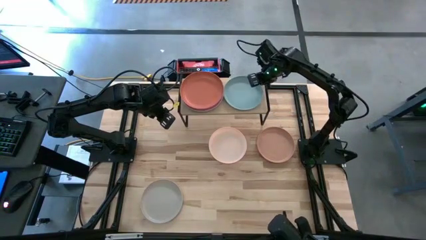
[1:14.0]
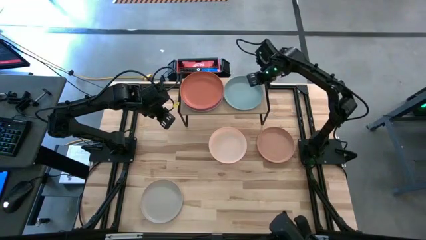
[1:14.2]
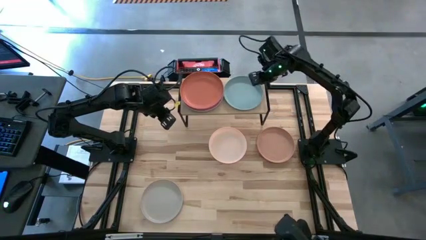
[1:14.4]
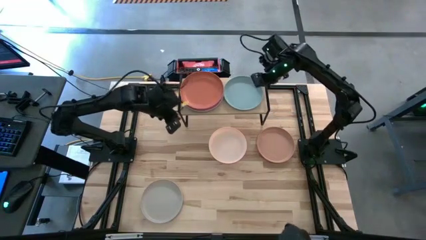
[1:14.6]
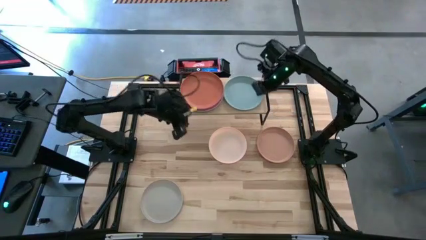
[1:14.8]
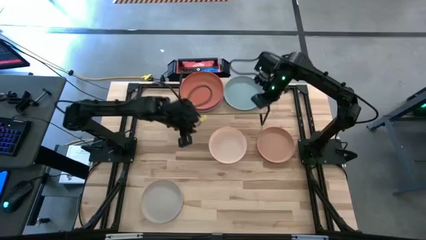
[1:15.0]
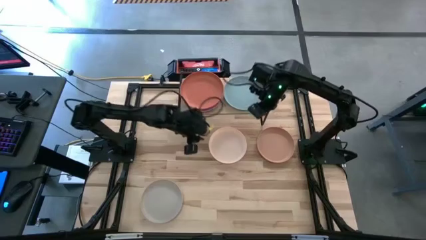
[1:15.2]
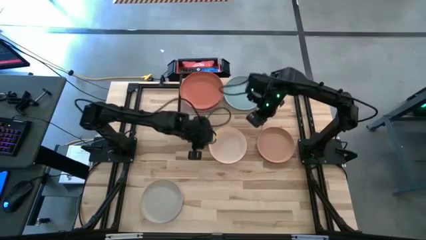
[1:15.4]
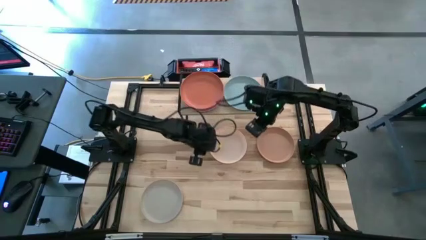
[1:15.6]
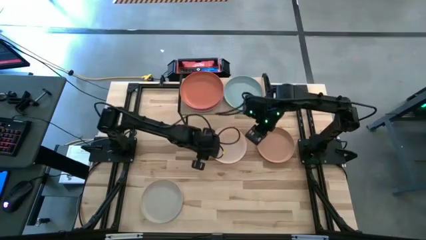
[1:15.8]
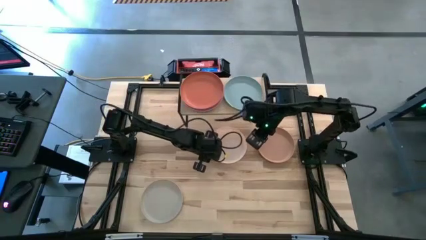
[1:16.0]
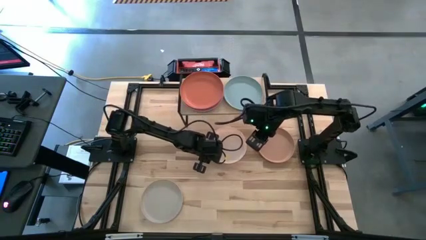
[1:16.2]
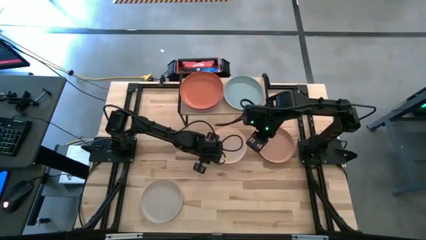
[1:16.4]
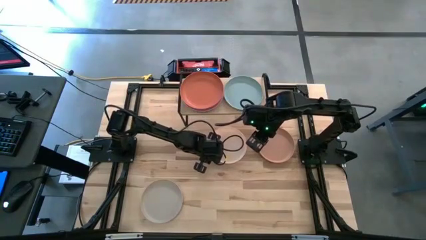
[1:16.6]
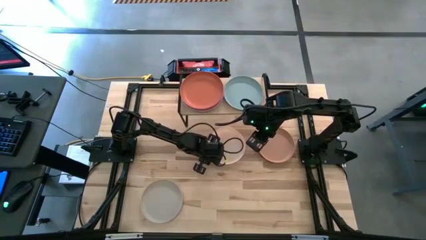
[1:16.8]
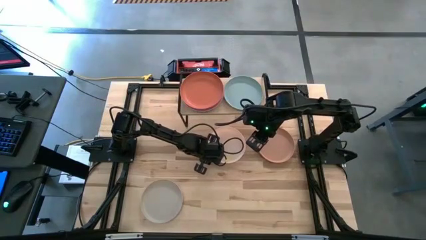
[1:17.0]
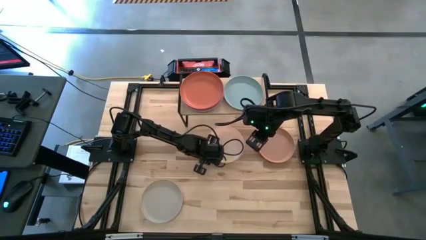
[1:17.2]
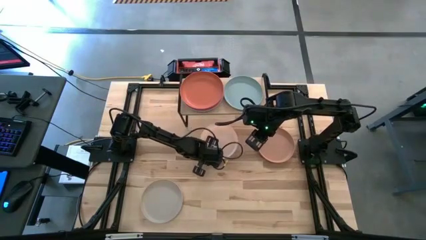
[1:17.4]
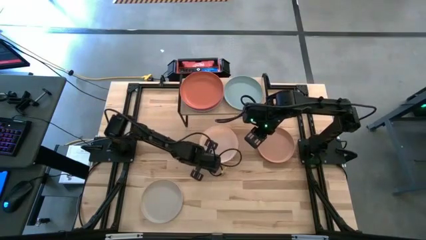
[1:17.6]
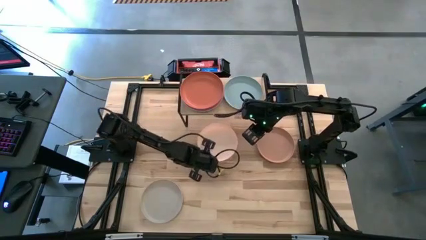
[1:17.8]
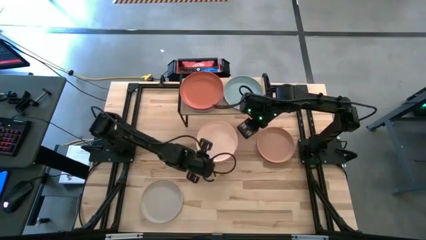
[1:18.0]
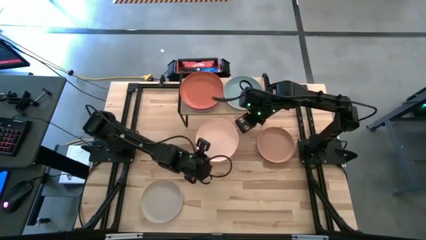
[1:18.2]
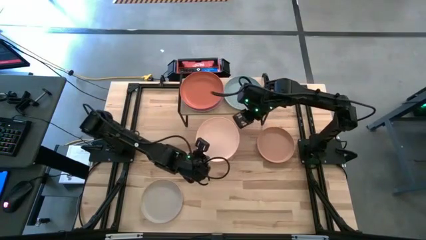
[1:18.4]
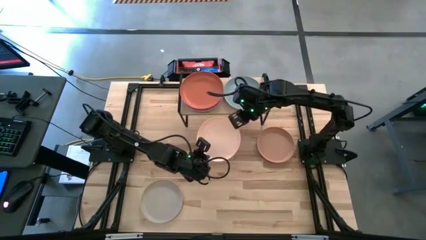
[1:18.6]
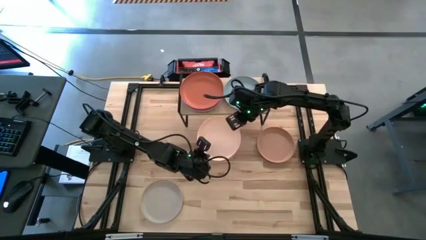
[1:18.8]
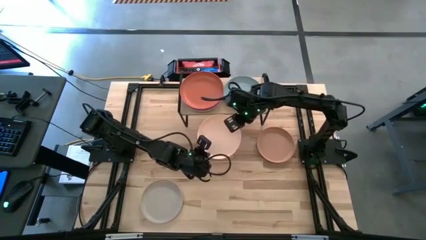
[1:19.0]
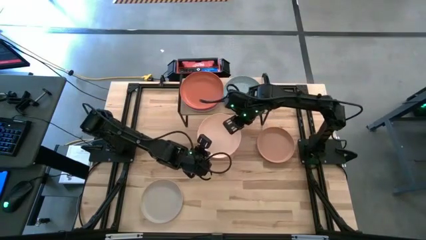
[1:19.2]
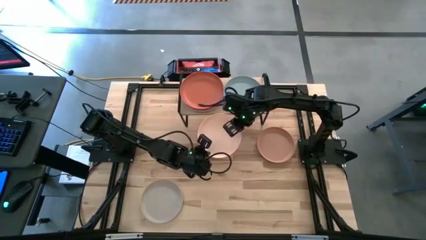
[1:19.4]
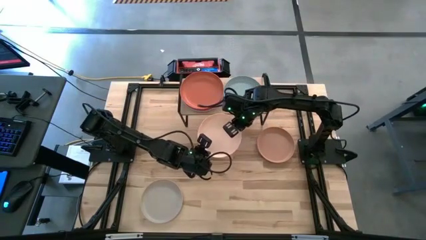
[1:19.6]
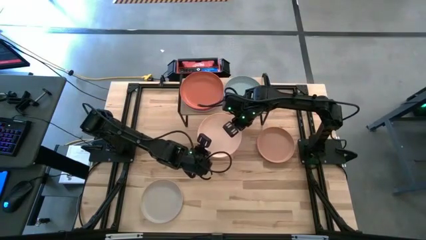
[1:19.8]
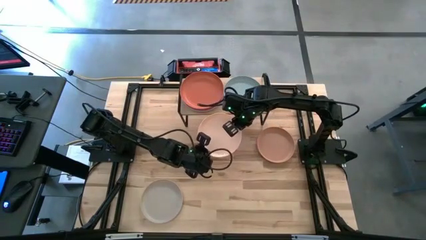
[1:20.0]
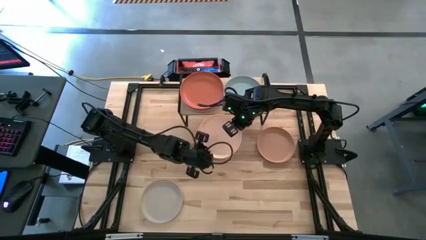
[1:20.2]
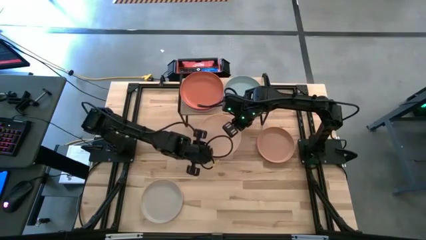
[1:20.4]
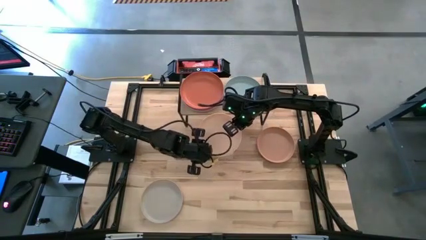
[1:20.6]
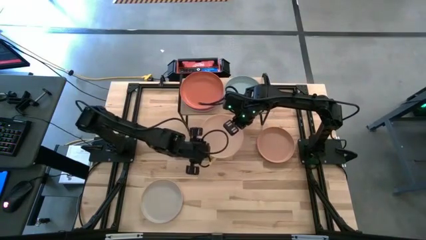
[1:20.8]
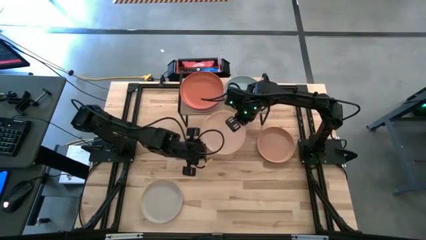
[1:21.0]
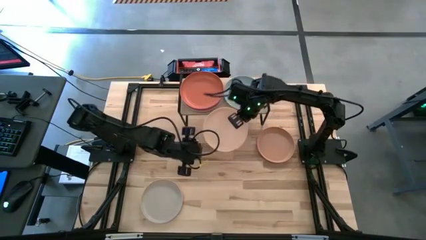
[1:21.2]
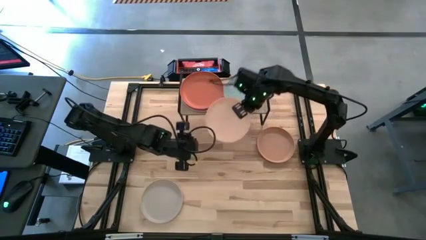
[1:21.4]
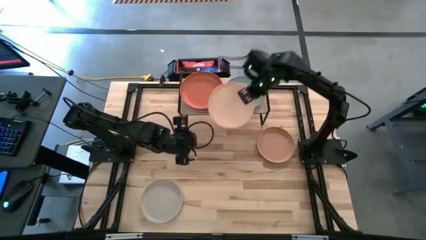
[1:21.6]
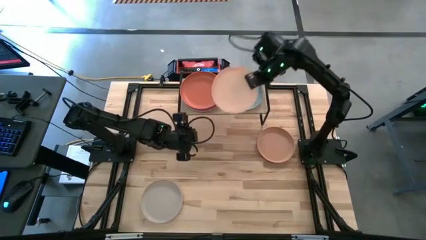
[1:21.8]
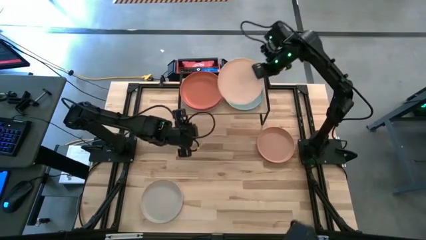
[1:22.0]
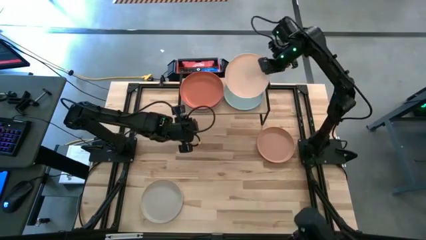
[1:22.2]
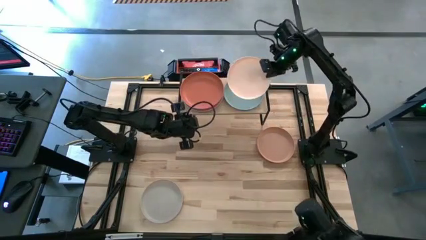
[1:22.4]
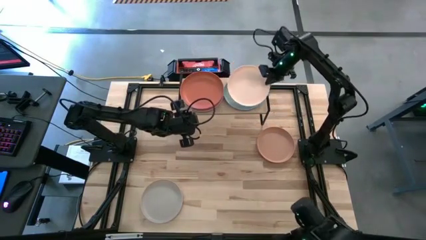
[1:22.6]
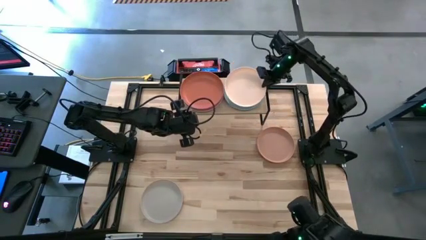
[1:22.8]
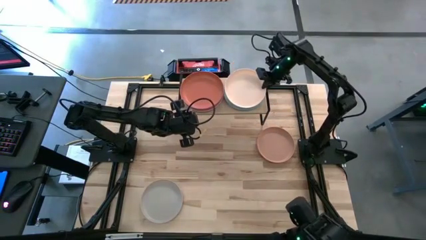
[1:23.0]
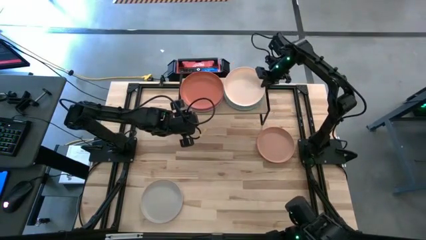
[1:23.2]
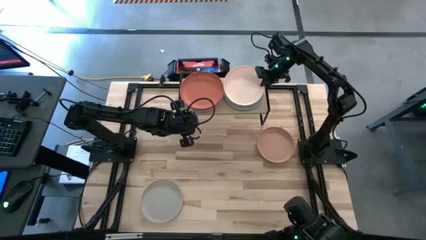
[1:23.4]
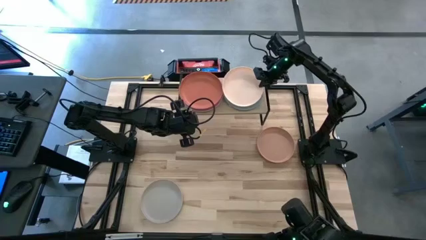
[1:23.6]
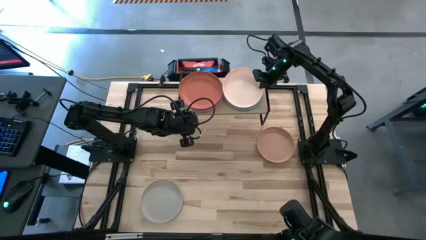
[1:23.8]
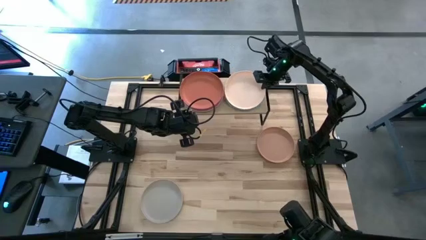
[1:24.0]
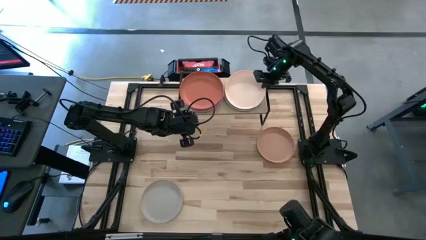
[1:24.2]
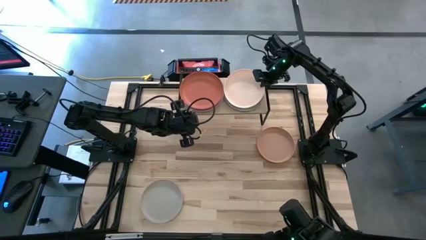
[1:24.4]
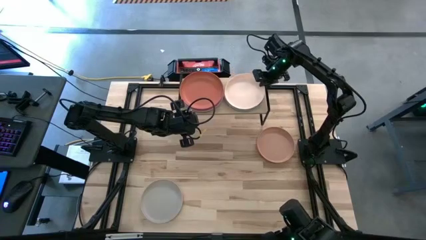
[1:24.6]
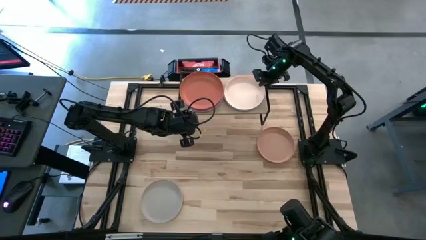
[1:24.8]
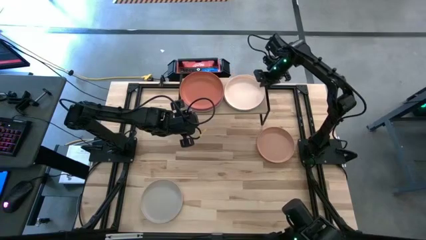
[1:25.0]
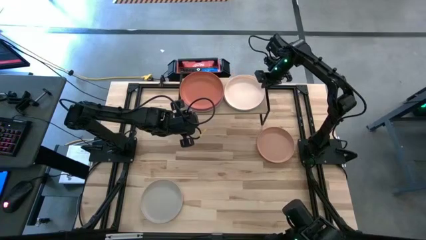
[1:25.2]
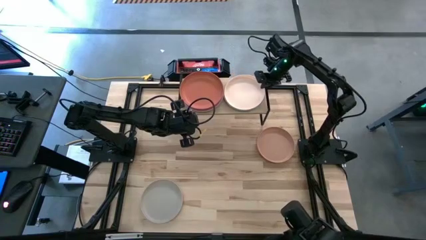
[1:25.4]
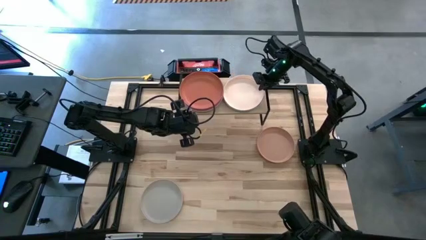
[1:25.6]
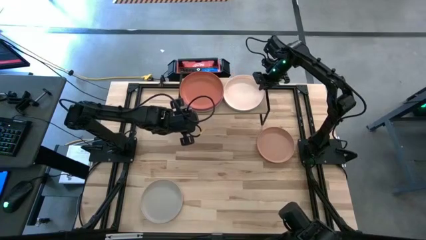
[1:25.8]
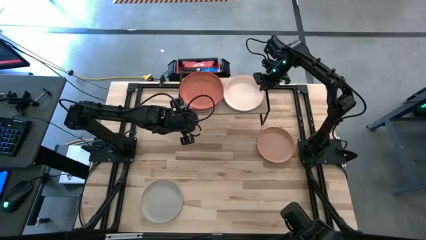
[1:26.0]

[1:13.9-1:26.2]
Task: Place and stack plates onto a shelf
Stack the light orange on top of the light blue plate on the shelf

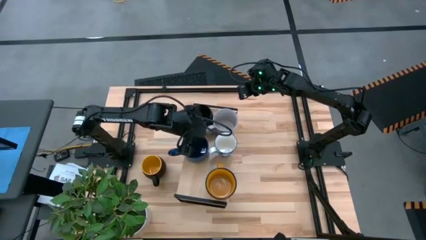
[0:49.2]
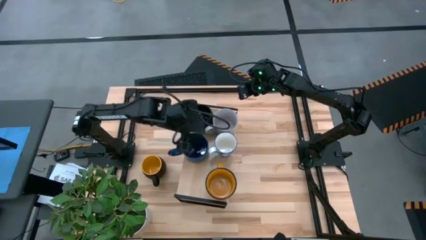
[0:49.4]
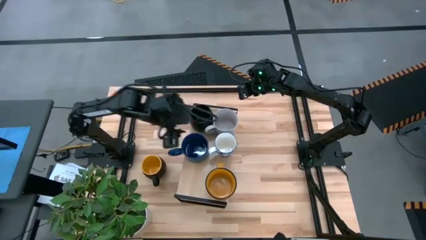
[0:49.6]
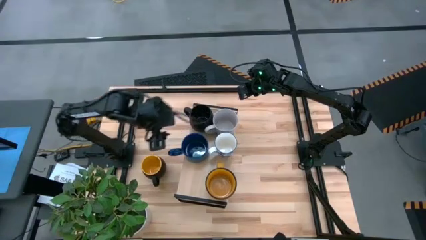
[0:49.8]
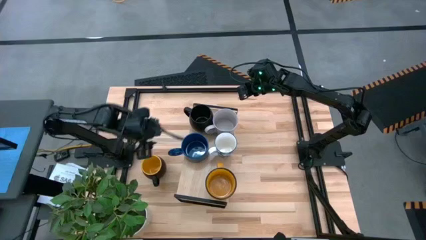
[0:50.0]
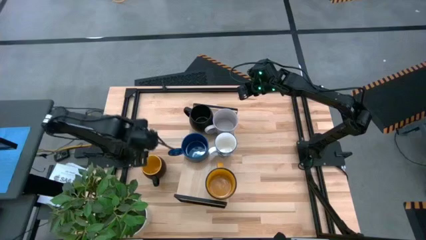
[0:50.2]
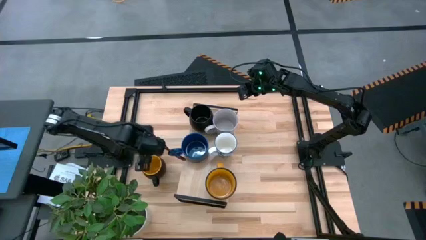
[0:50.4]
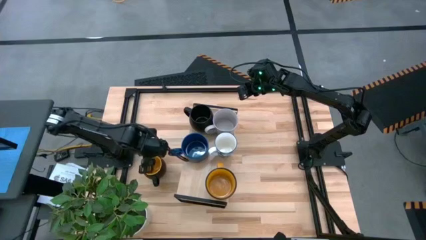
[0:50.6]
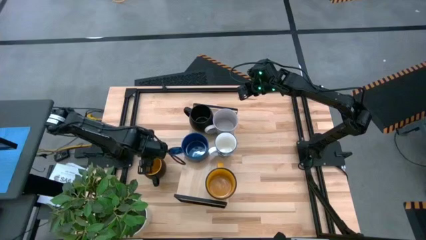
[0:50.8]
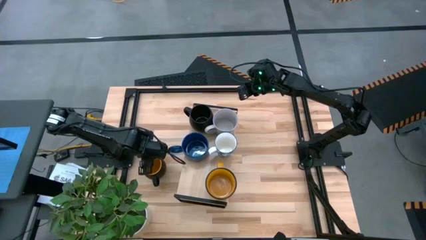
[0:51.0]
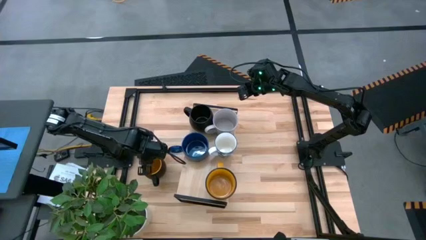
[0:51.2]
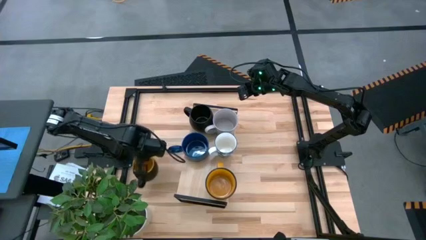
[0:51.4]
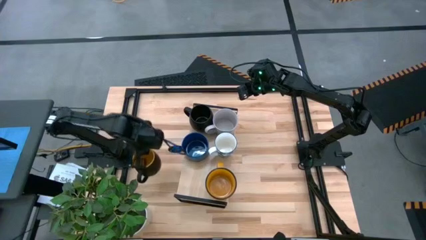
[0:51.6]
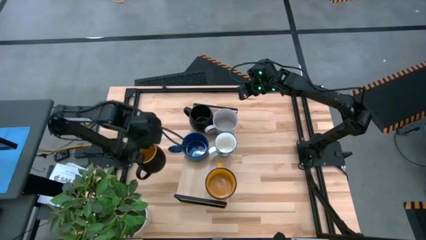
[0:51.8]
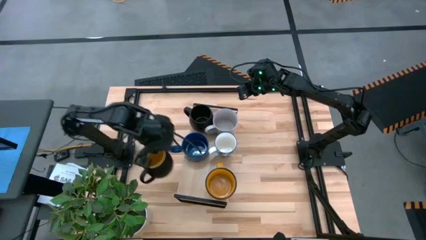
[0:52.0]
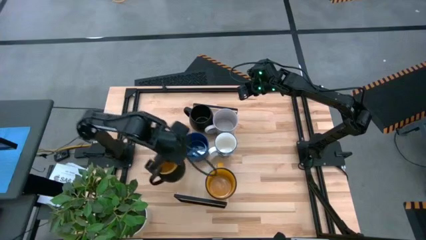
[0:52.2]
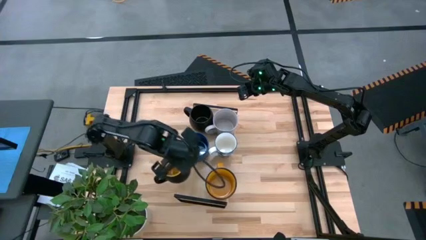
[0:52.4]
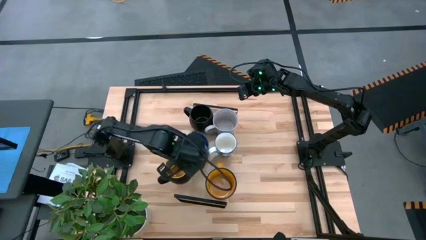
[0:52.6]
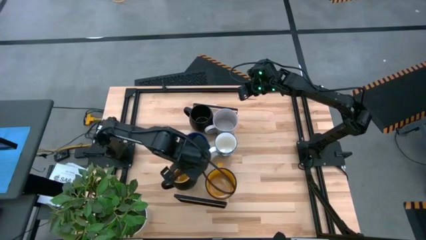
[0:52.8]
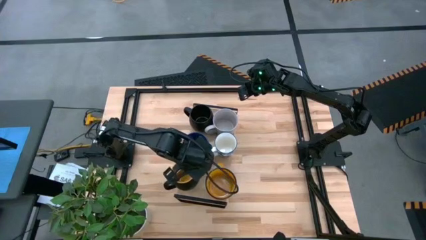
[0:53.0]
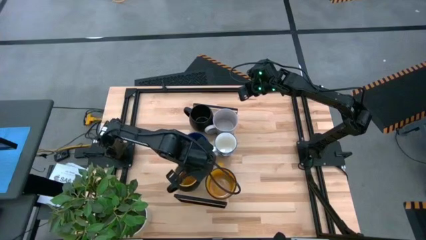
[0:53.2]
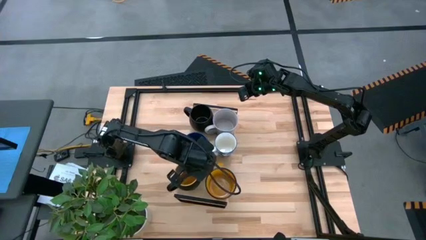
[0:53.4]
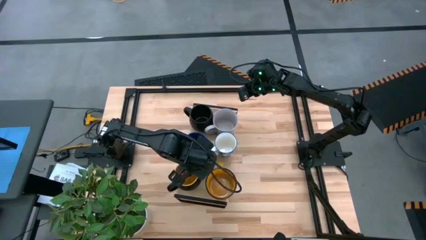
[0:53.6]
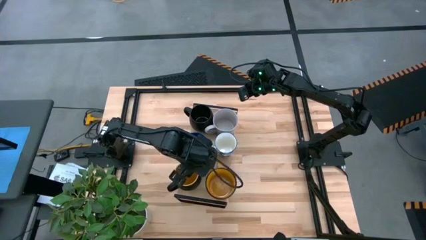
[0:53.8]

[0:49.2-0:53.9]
Task: Place coffee mugs
Put the black mug on the shelf
